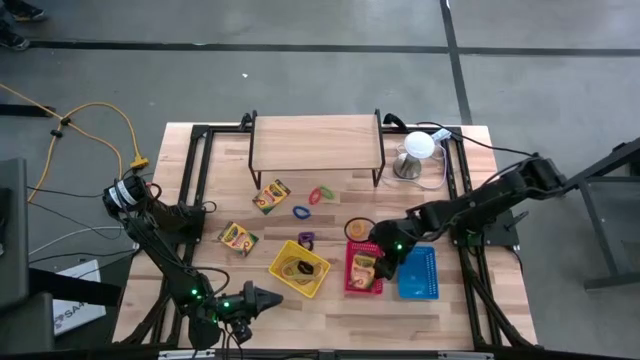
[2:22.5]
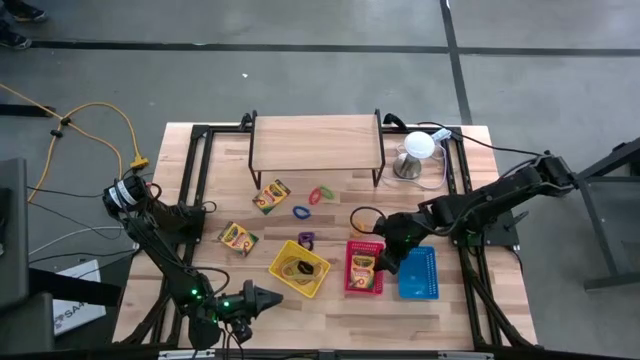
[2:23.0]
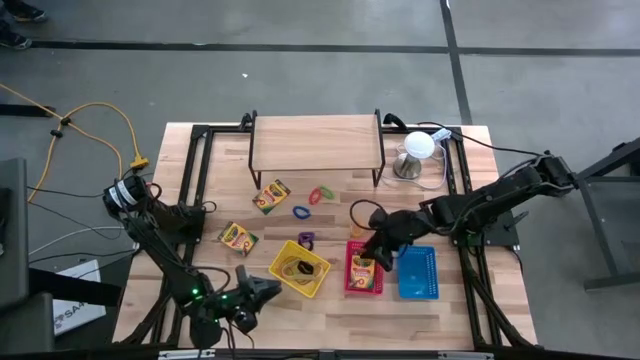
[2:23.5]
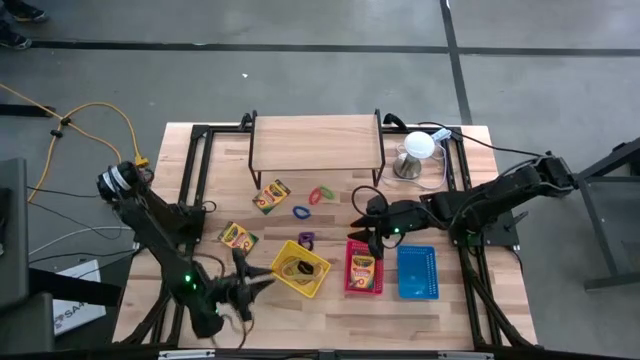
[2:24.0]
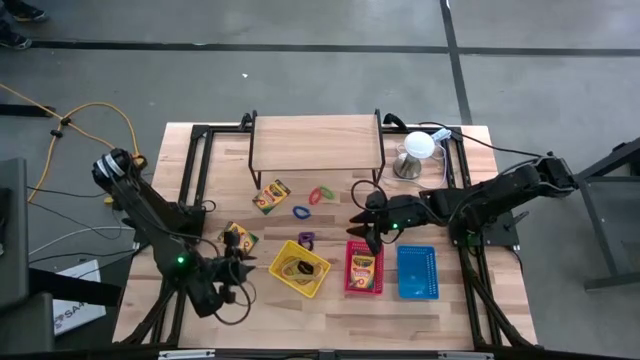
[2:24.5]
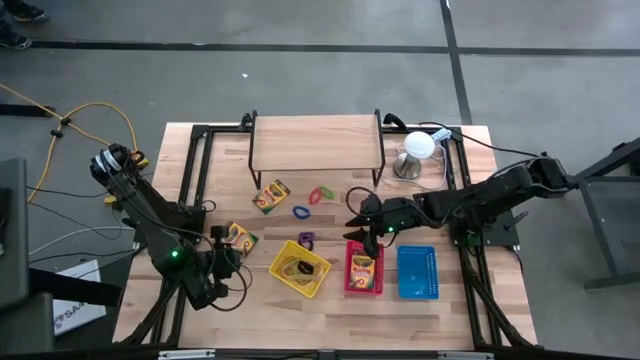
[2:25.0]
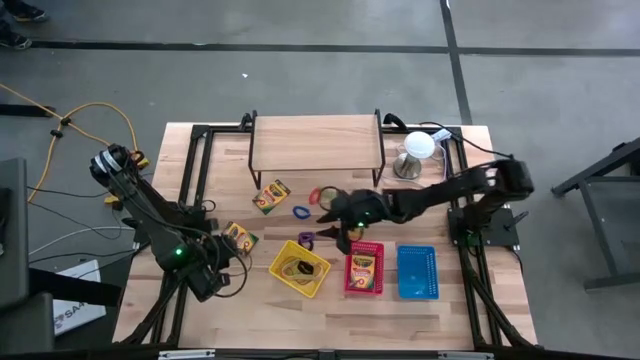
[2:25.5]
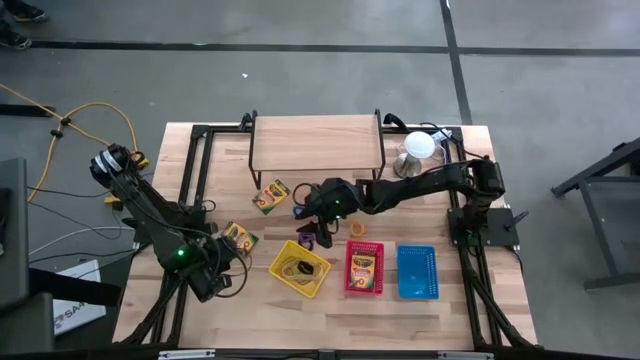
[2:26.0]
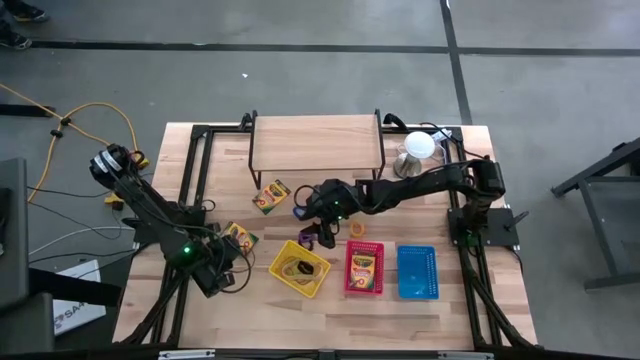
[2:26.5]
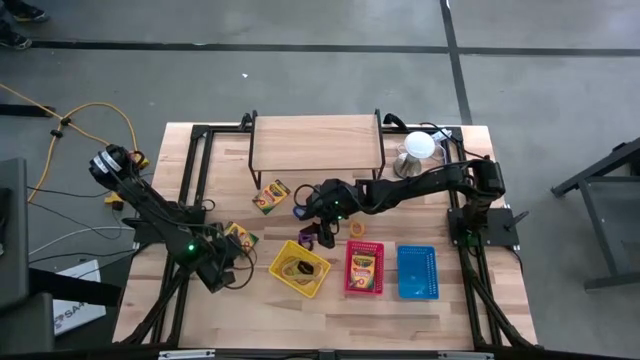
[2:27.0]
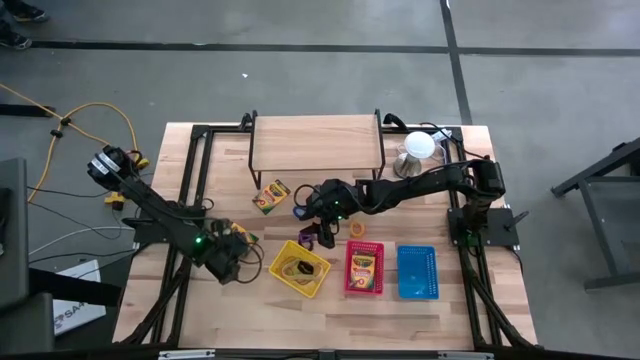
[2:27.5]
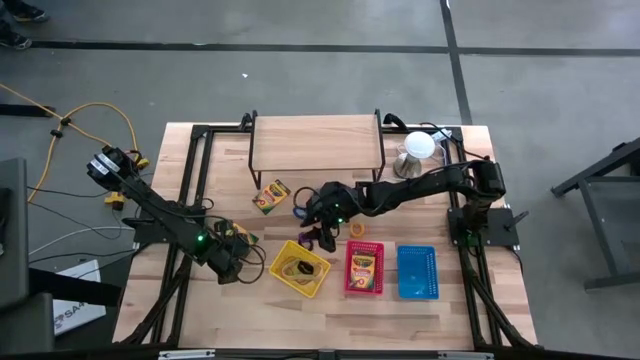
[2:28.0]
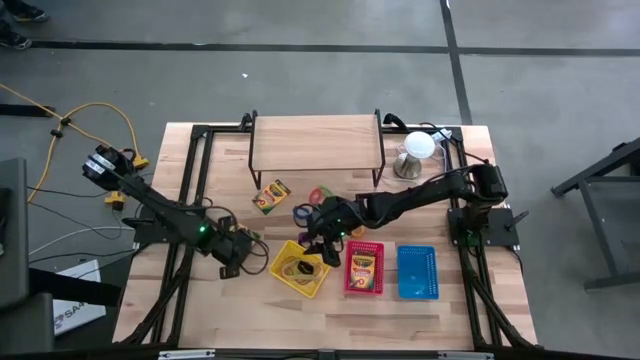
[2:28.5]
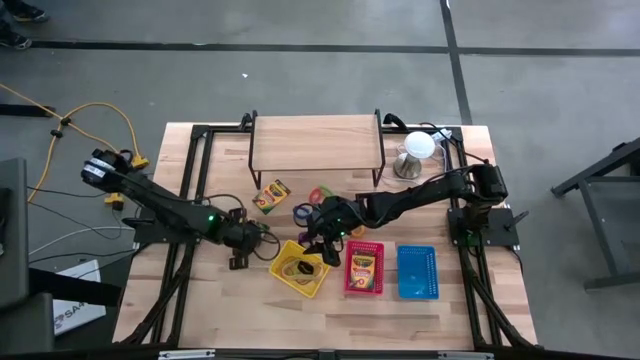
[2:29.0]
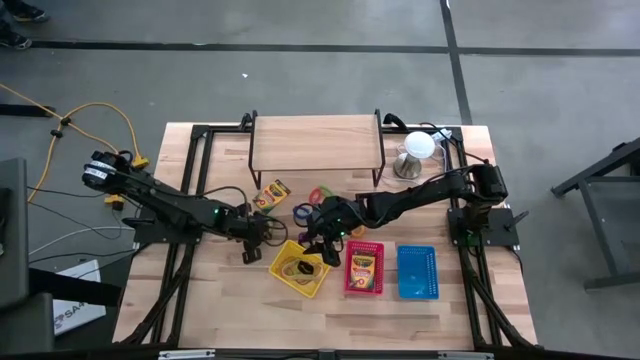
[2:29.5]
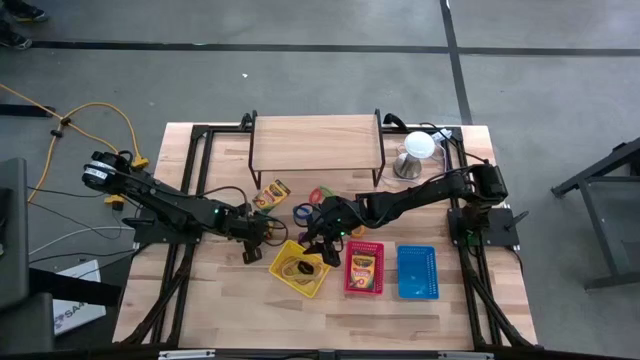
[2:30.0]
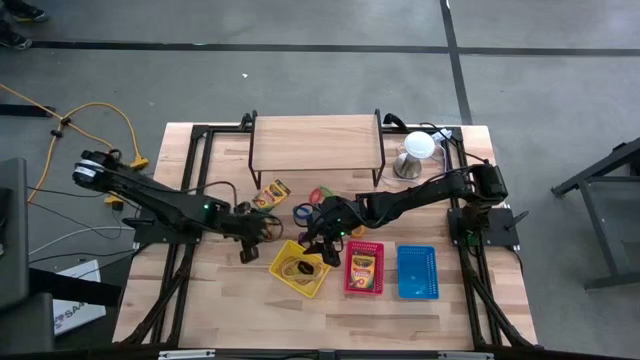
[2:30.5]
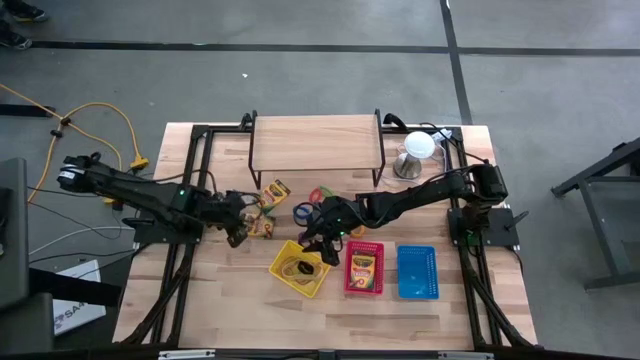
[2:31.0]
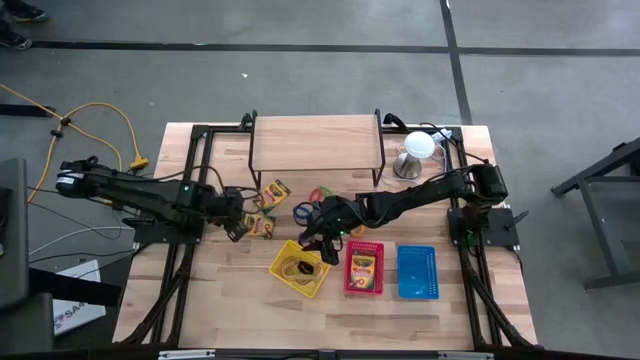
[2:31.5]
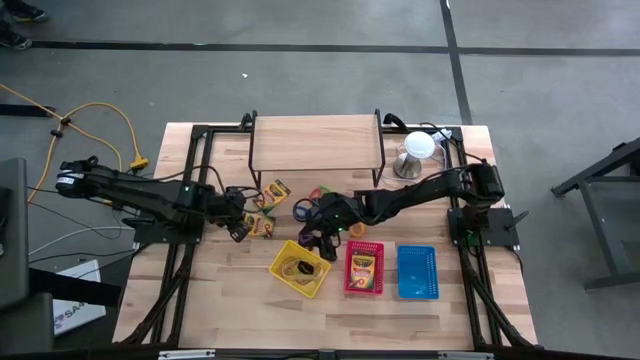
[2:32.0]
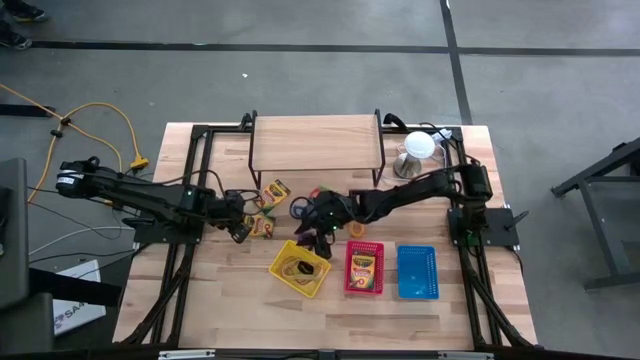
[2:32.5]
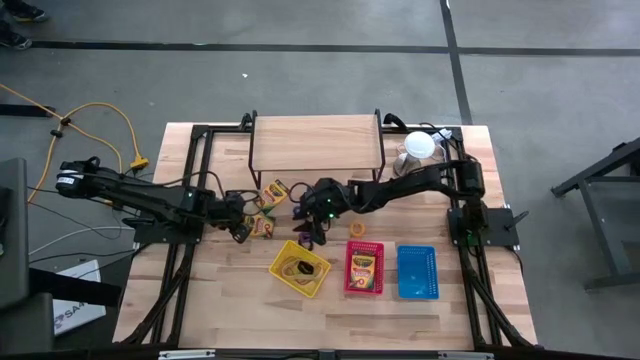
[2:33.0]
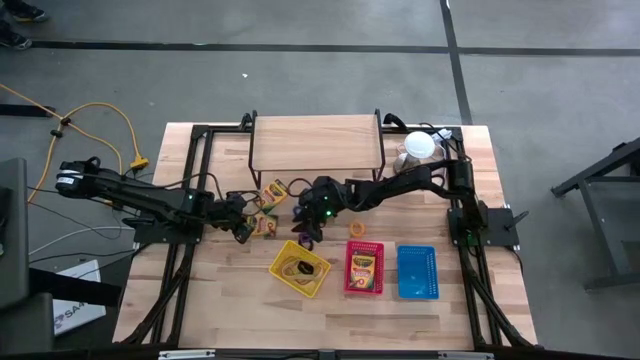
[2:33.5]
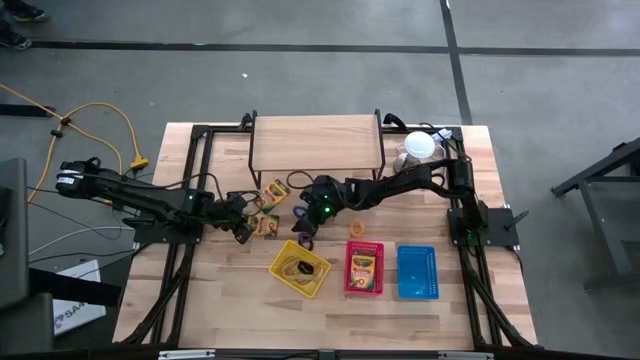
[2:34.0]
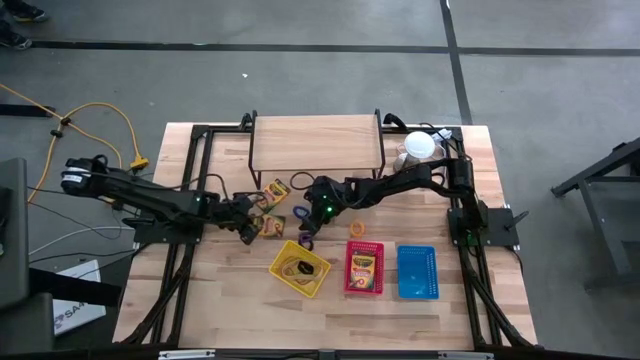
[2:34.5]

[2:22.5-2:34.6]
Task: Pick & Place Office Desk Supplies
Put the bottom crayon box into the red bin

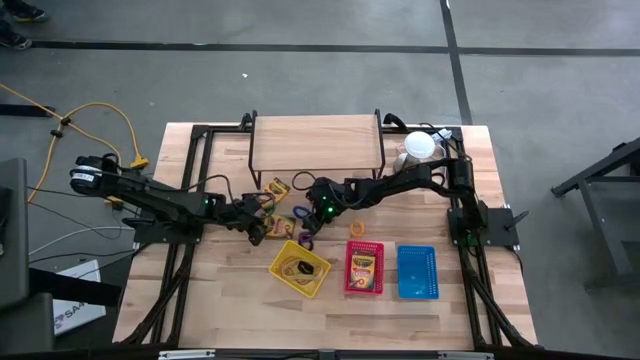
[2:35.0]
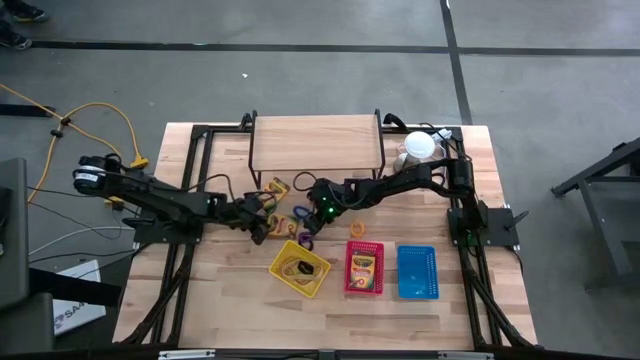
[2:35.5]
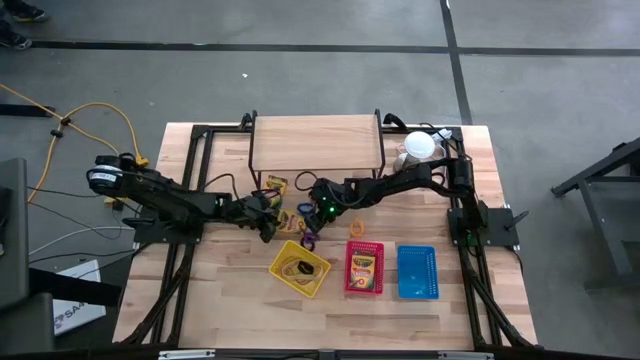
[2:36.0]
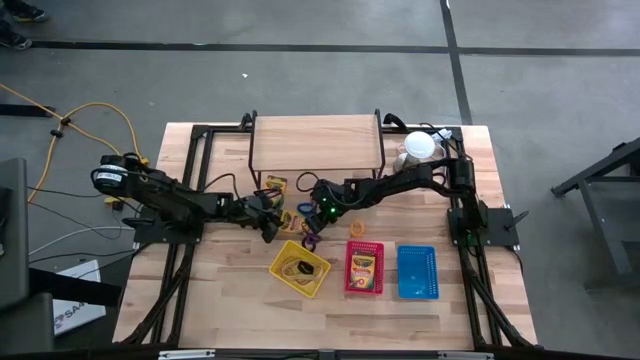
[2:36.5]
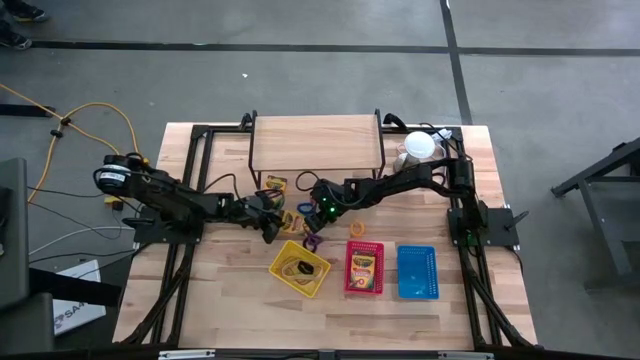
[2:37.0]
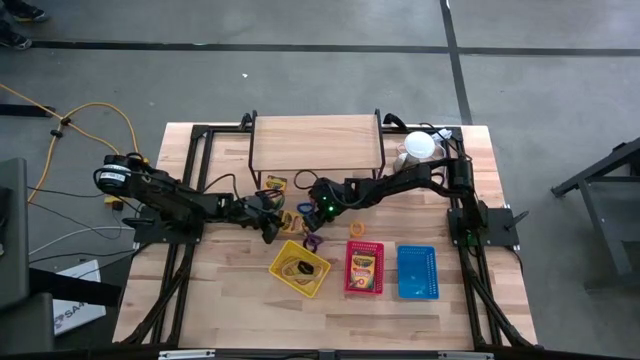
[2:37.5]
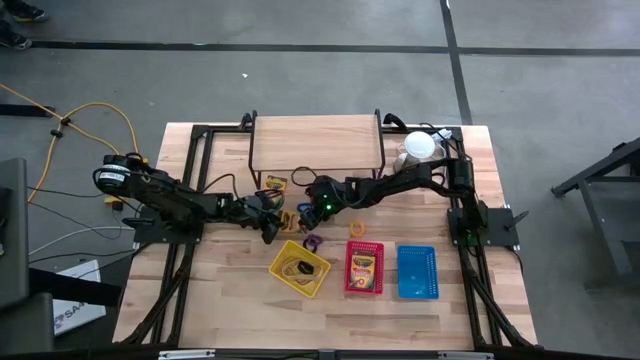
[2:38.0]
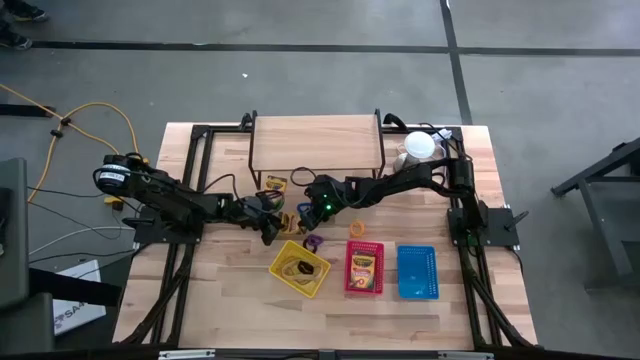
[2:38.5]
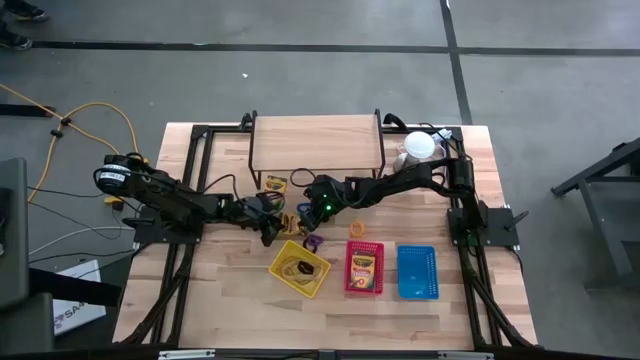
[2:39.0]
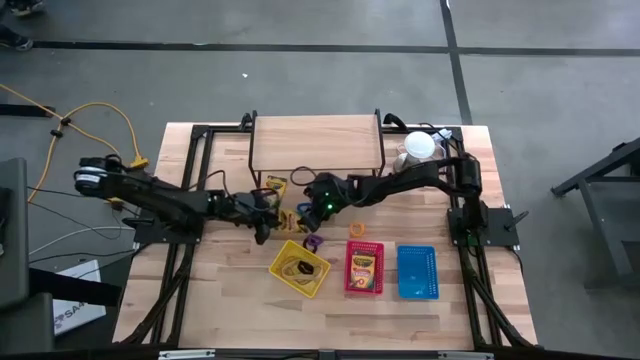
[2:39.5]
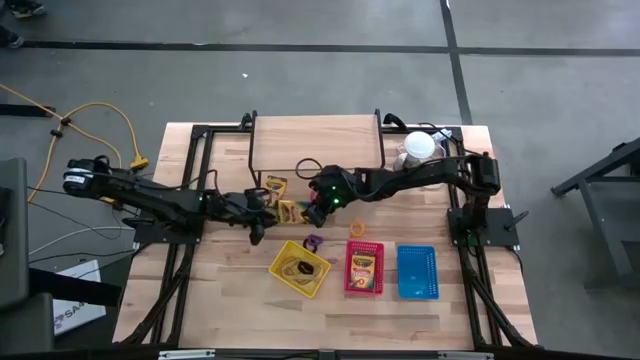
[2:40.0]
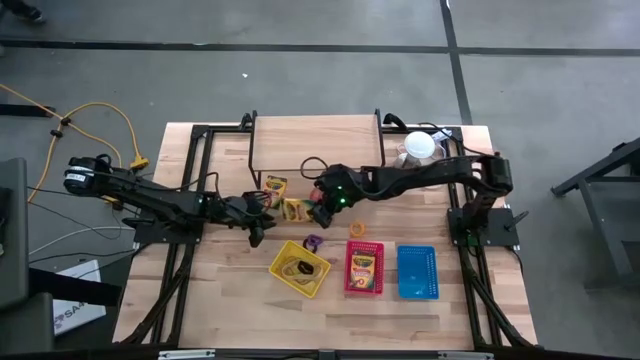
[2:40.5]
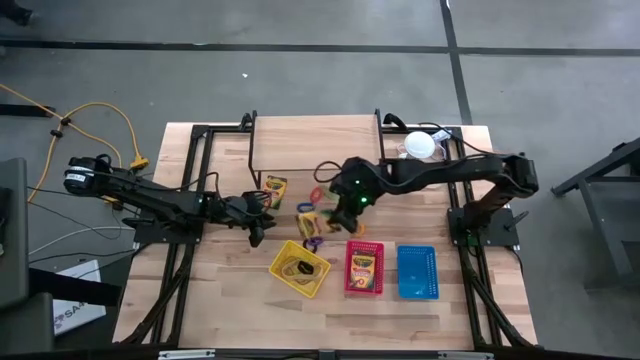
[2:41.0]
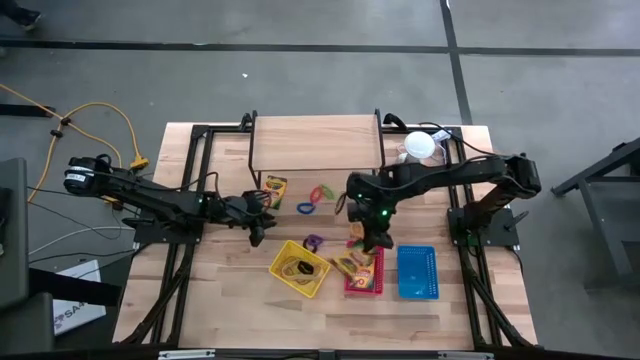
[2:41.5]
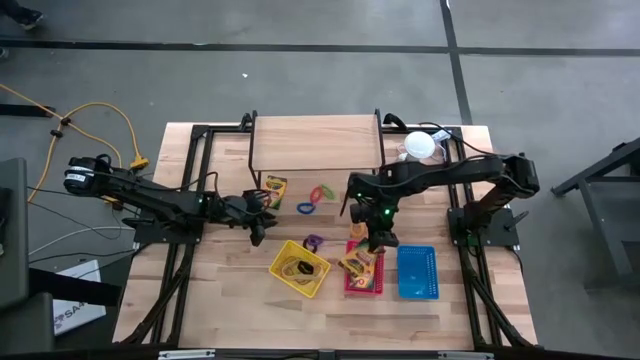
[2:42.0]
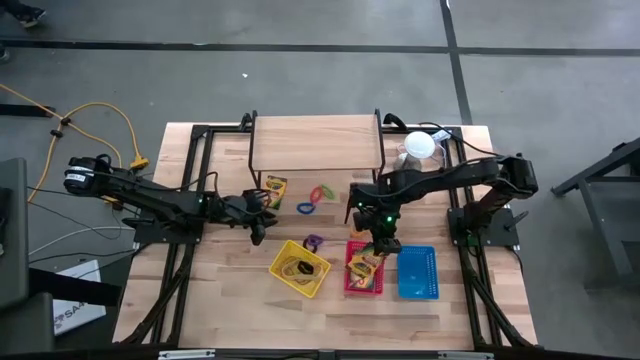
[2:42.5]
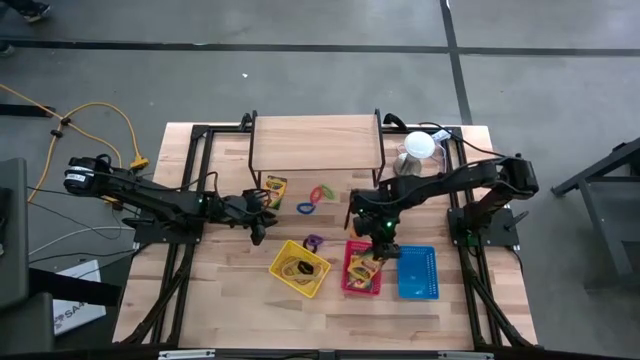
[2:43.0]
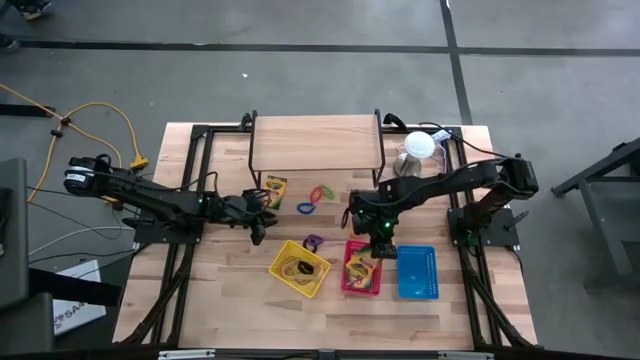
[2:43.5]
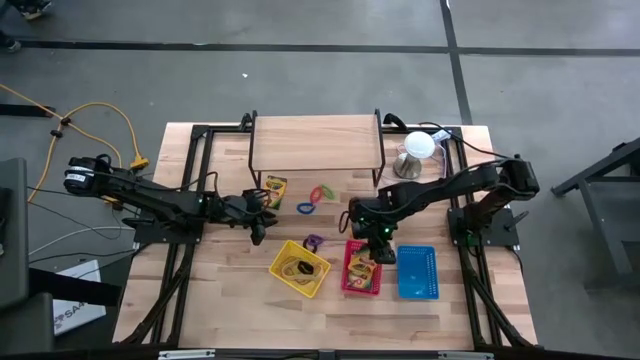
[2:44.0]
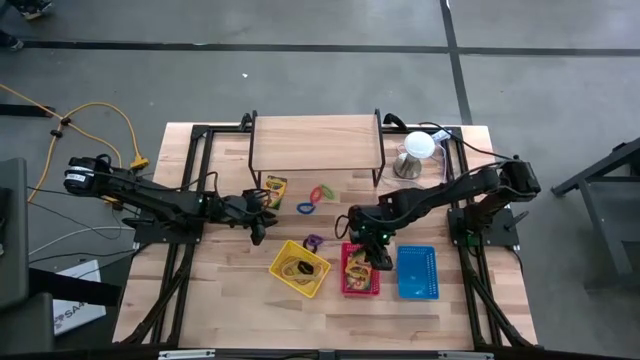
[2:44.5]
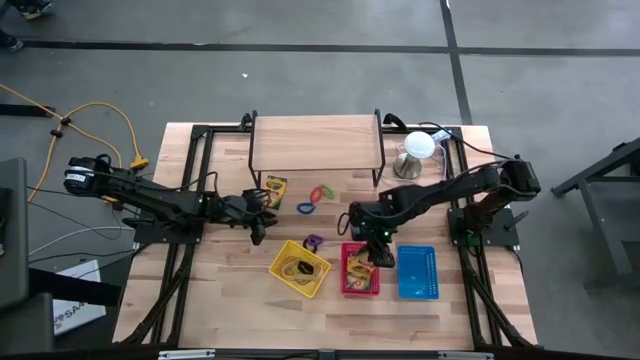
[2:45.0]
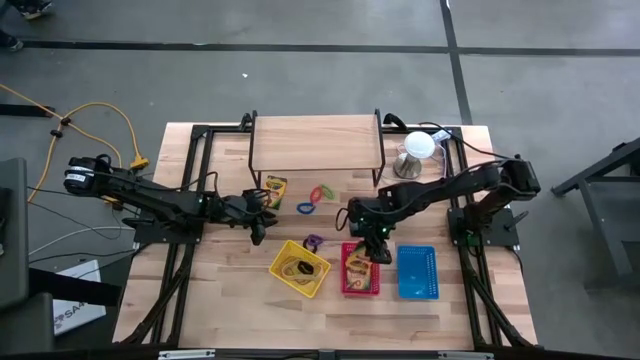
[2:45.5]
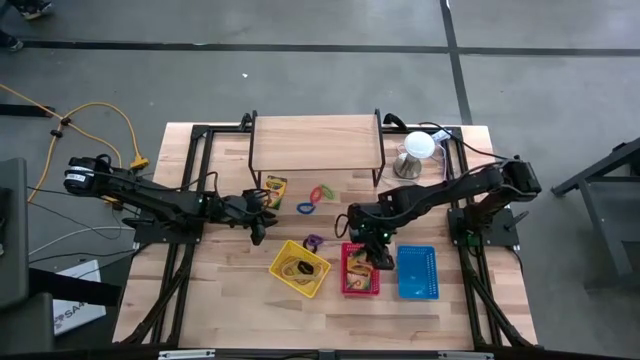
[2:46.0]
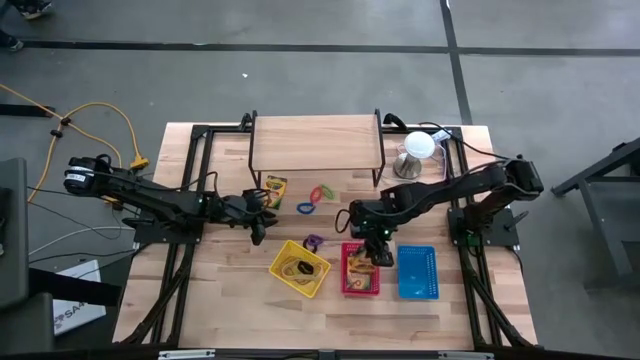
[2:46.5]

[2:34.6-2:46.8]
Put the bottom crayon box into the red bin
